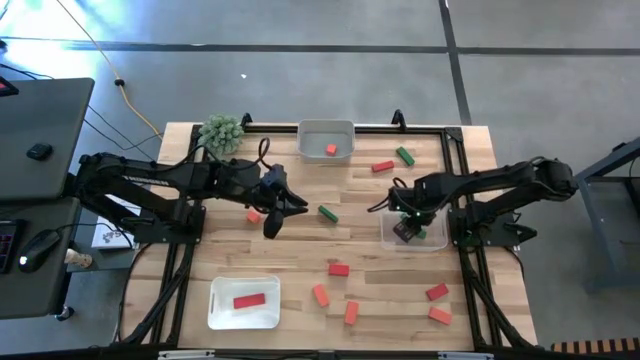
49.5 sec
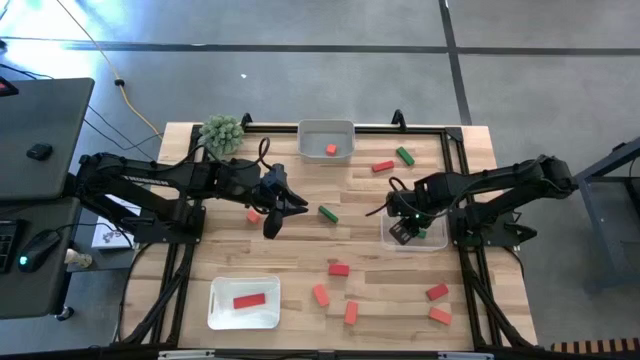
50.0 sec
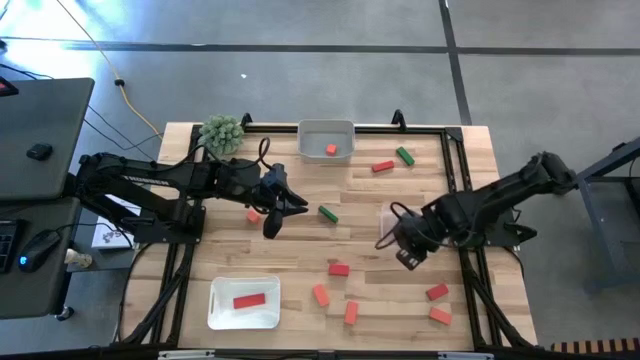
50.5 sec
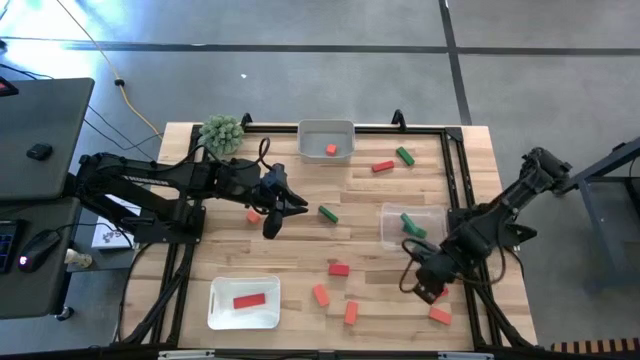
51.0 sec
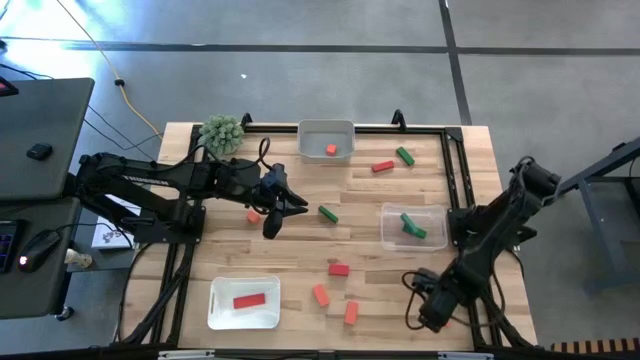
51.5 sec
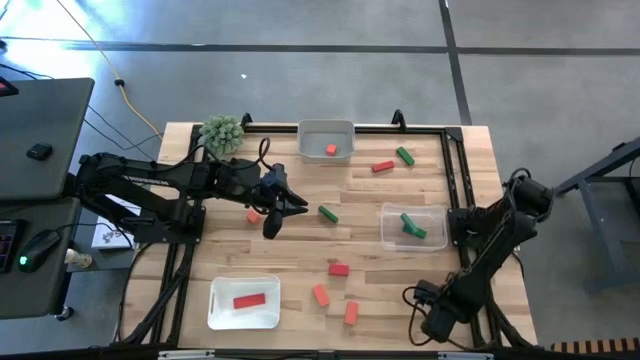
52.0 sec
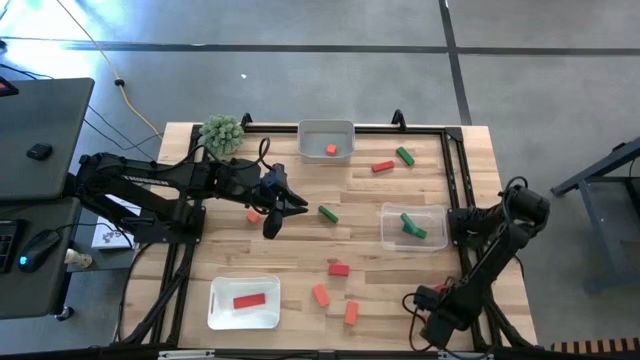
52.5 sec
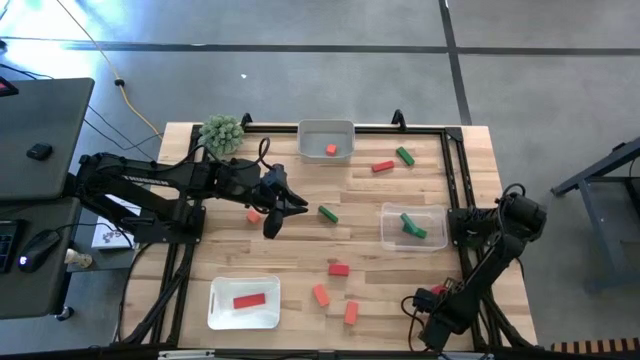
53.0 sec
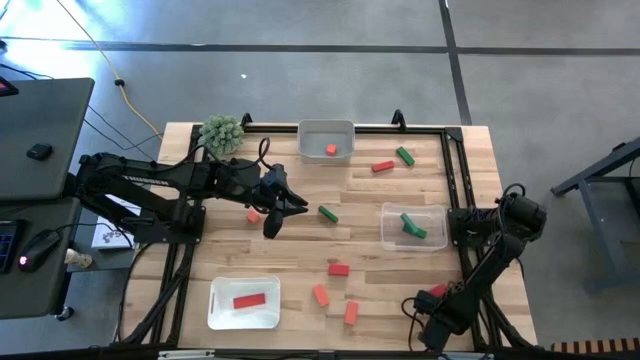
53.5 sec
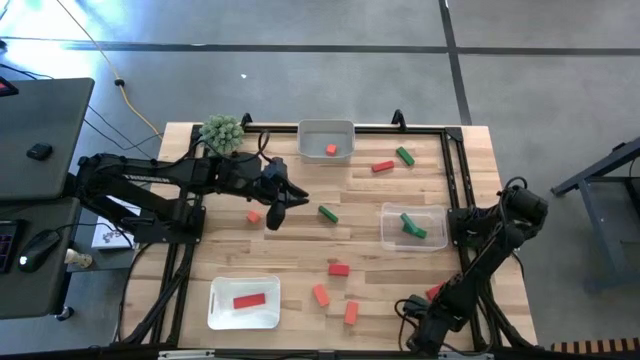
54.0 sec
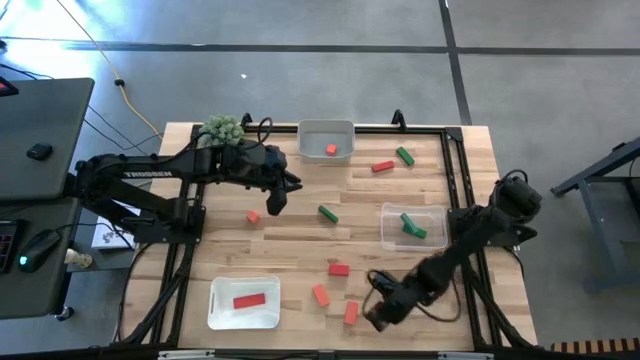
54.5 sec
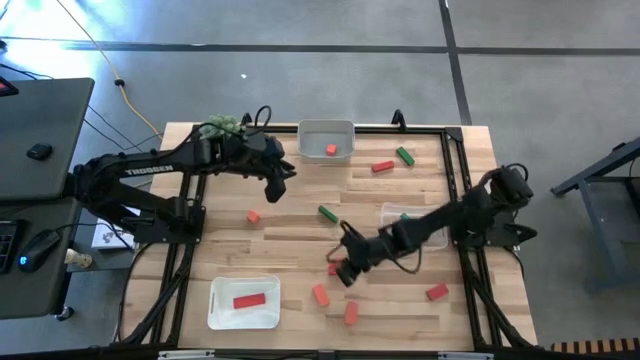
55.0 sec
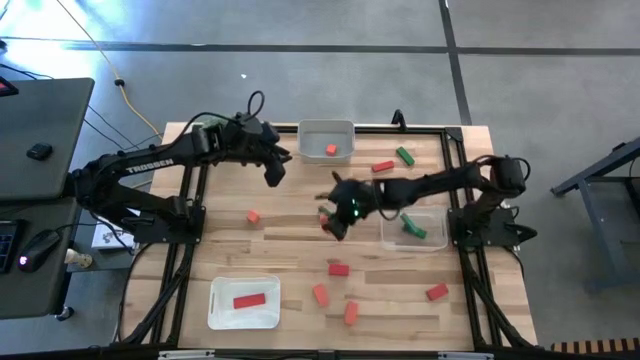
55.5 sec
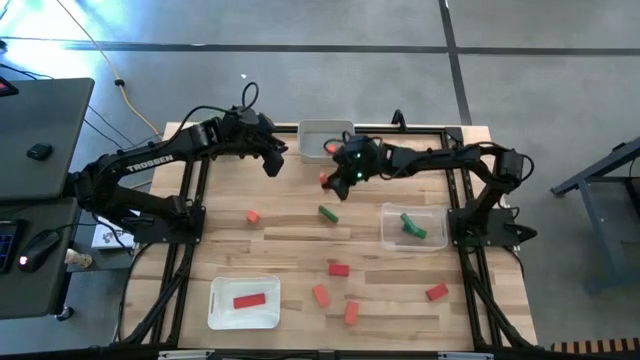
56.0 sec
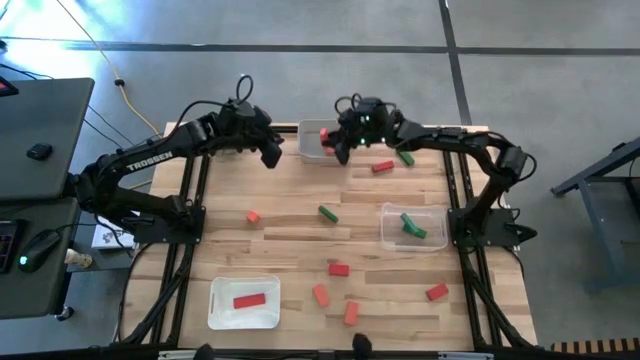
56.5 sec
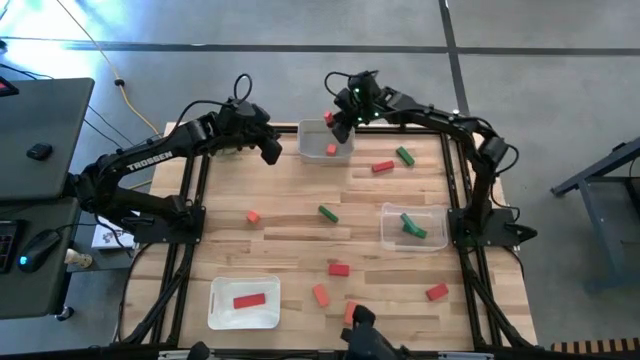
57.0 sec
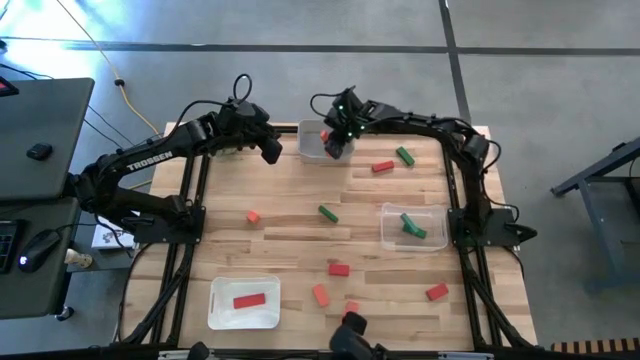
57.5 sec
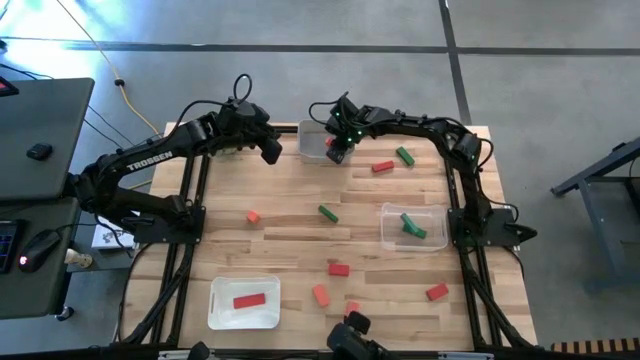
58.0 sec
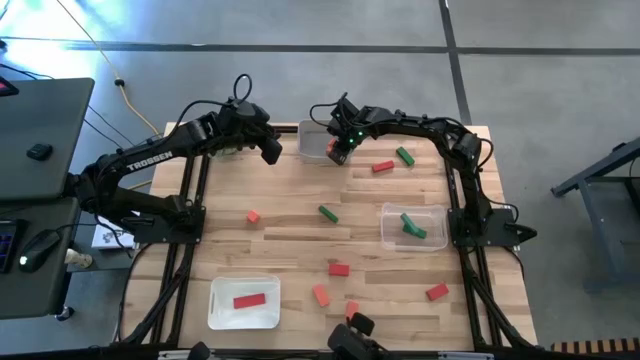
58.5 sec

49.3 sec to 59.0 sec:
Task: Sort & place blocks by color
Put the orange wooden block into the gray bin

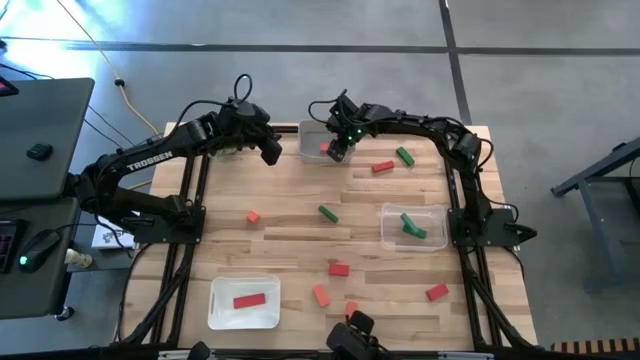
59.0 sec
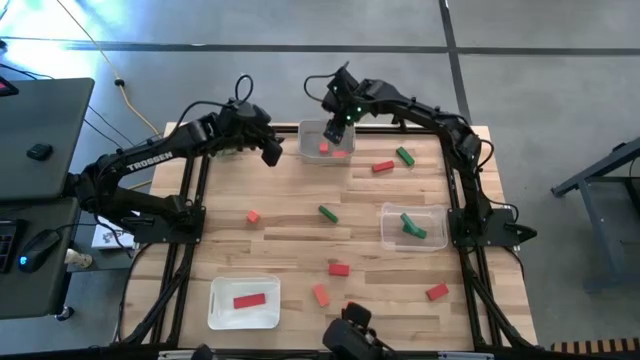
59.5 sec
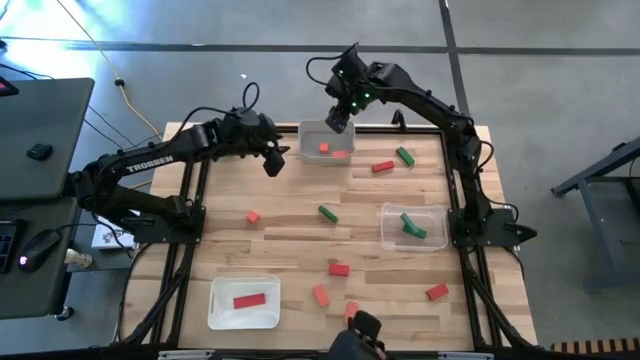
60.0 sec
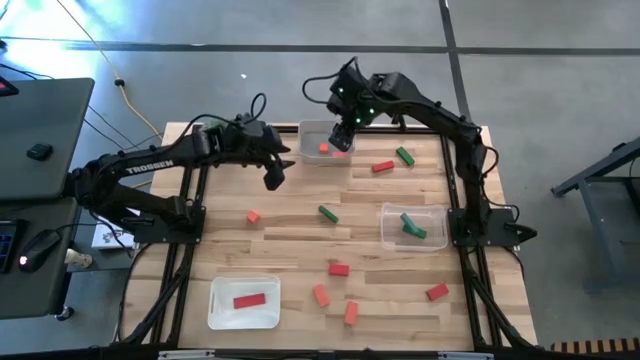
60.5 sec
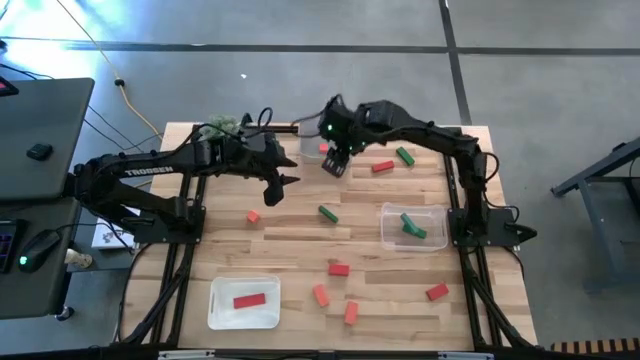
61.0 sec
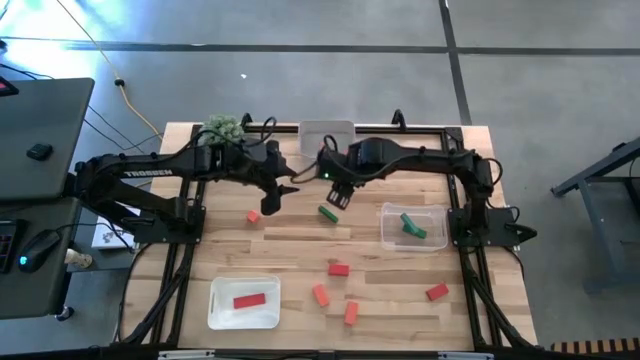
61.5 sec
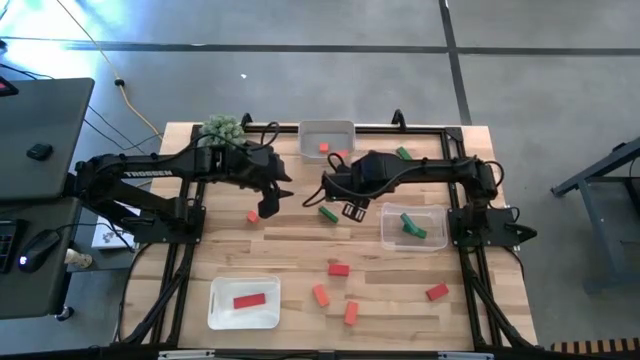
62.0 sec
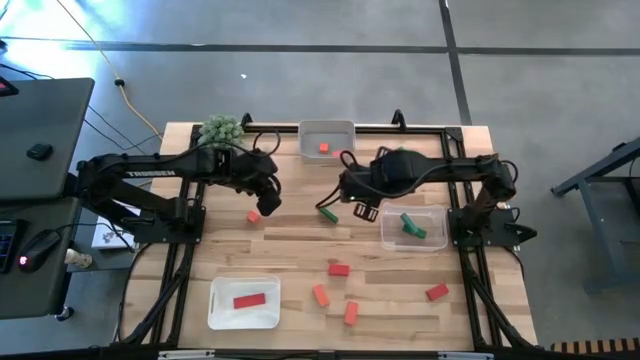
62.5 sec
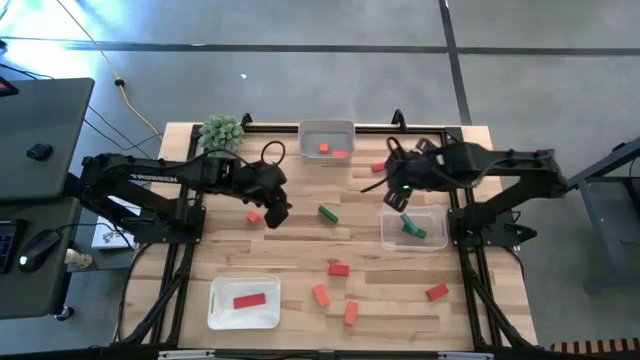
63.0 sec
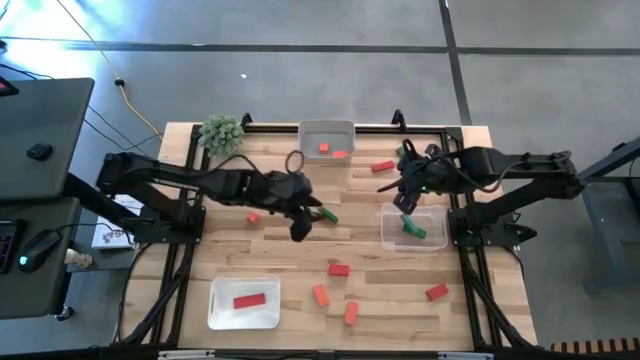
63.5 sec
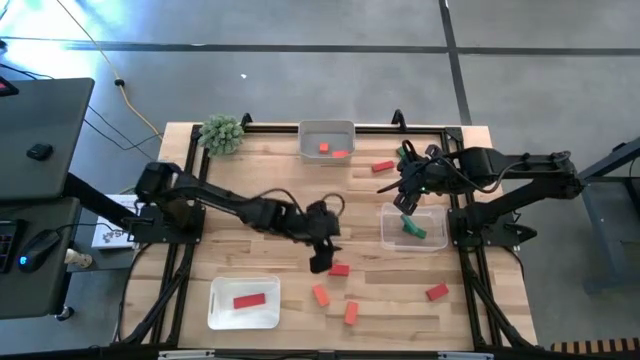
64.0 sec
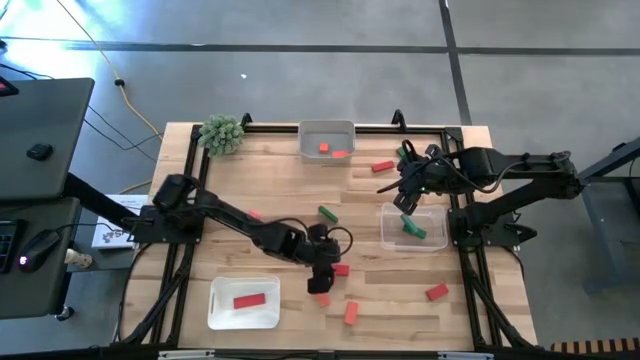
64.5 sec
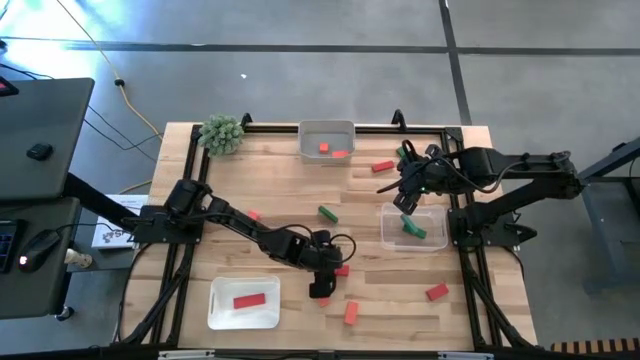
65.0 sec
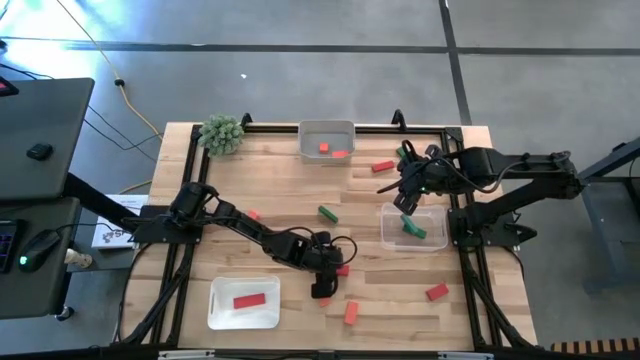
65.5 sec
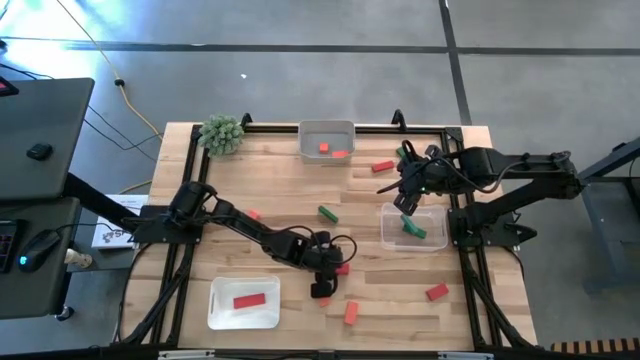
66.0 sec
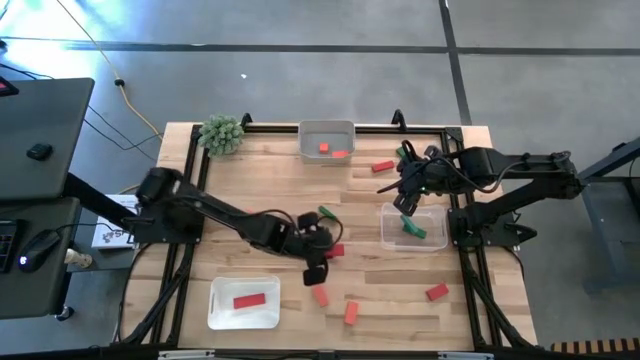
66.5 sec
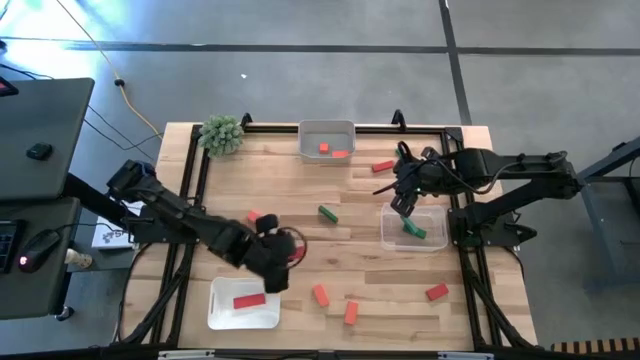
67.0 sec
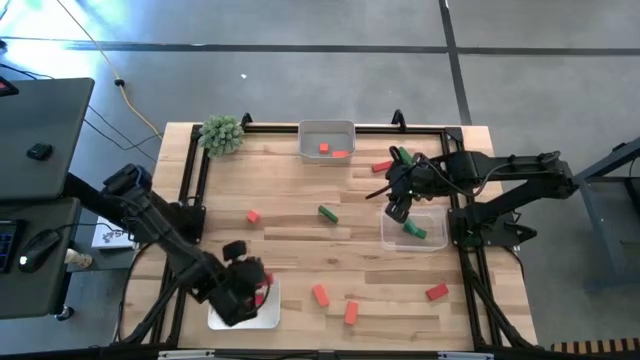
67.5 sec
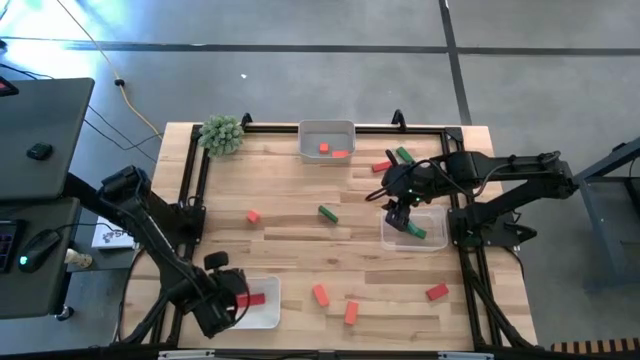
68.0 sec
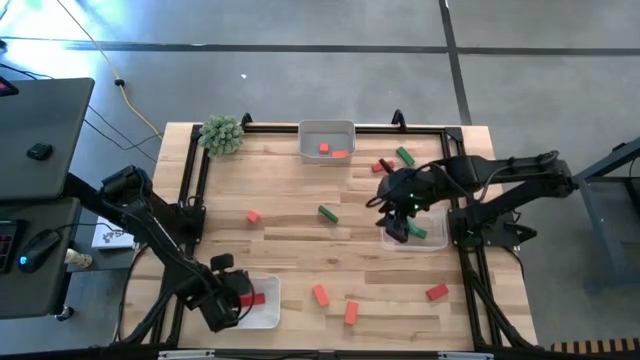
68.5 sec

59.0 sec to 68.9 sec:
Put the red wooden block into the white bin

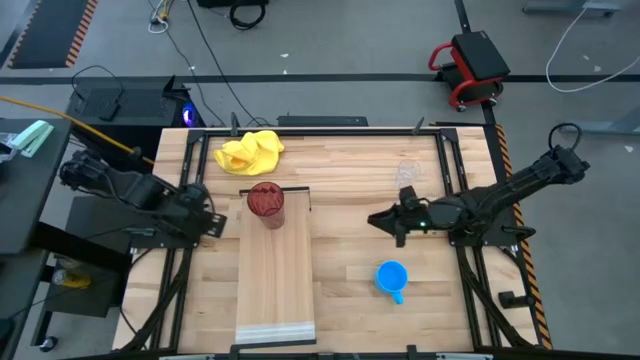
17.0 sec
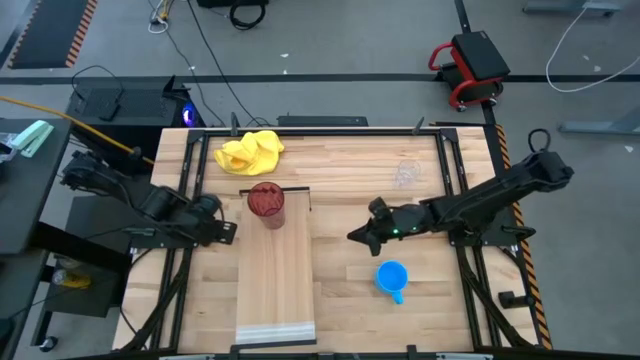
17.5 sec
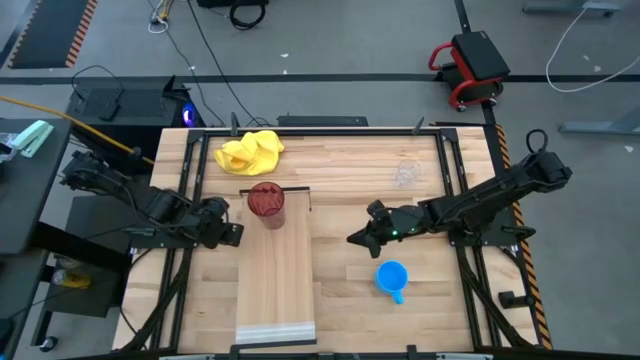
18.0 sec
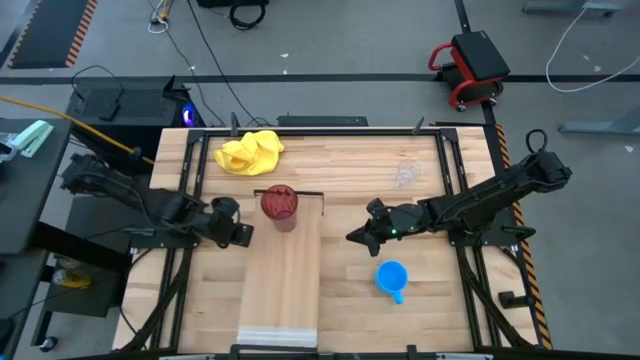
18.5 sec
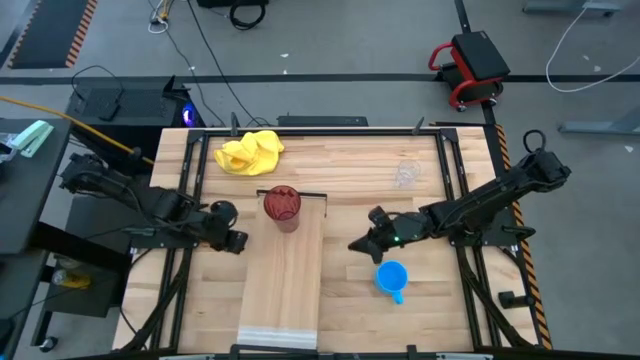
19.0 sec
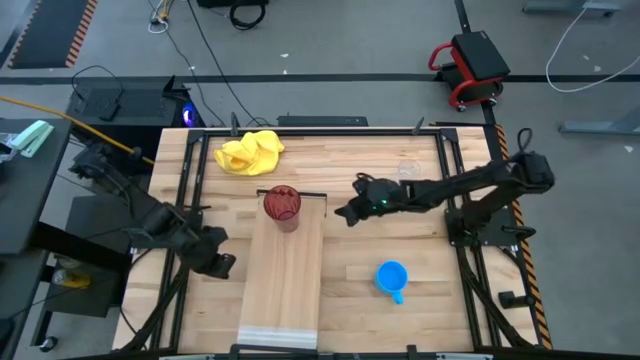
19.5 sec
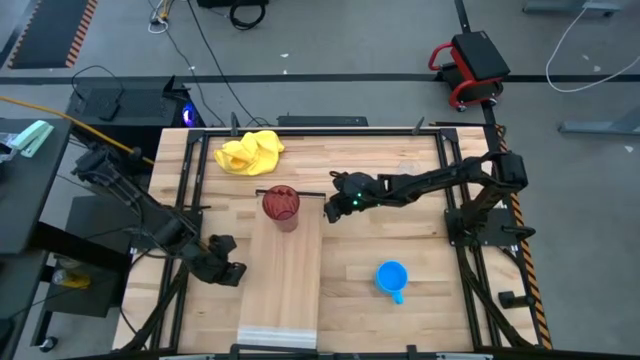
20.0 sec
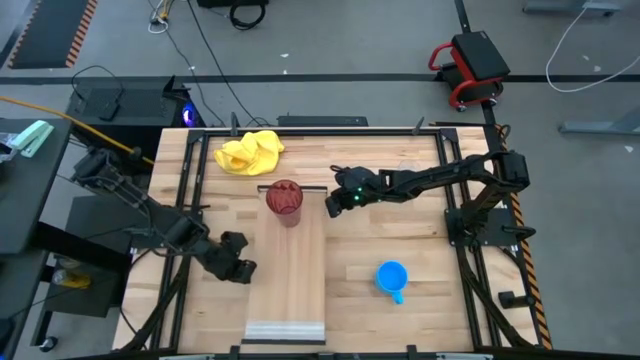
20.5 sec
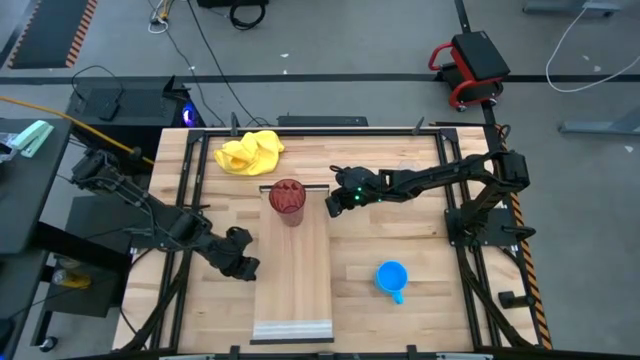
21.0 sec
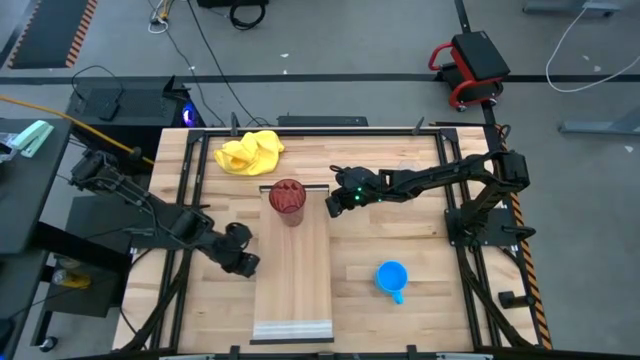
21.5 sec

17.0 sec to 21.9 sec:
Task: Stack small to large cups/mugs on shelf
Adjust the shelf
